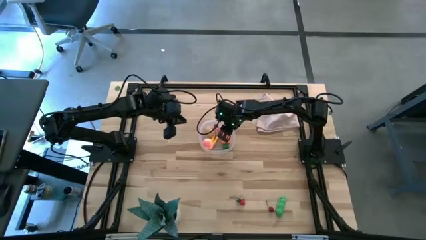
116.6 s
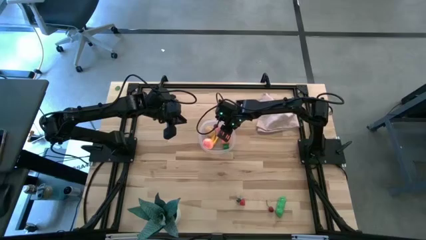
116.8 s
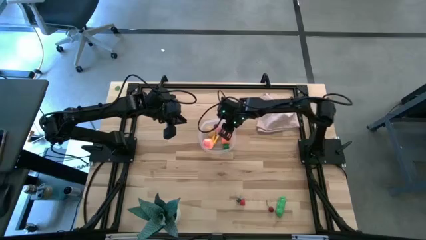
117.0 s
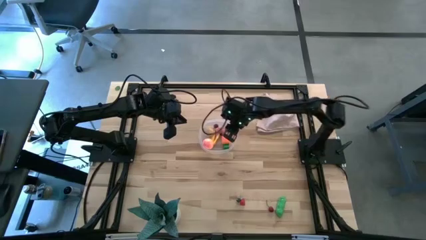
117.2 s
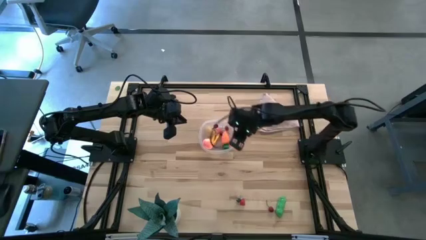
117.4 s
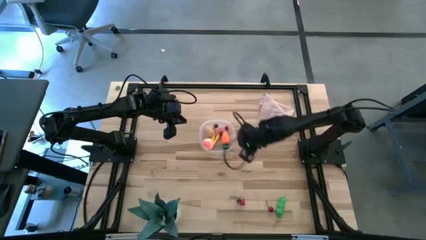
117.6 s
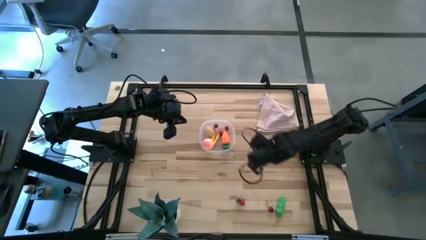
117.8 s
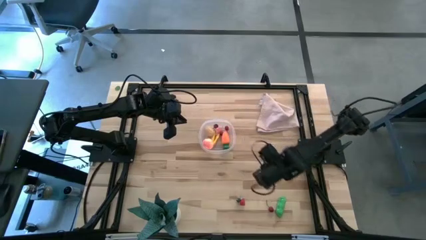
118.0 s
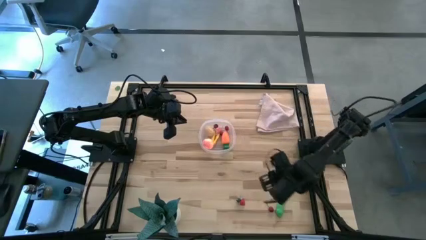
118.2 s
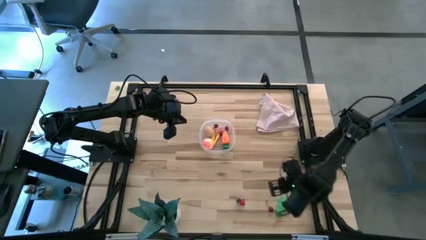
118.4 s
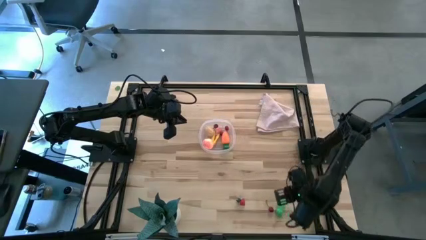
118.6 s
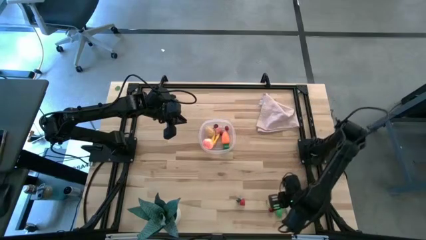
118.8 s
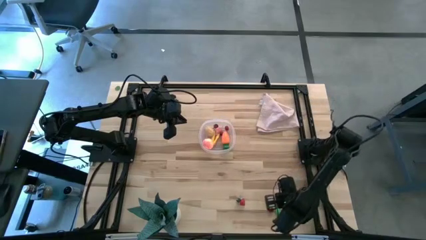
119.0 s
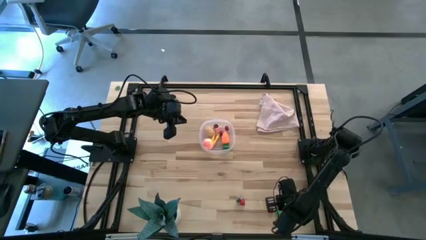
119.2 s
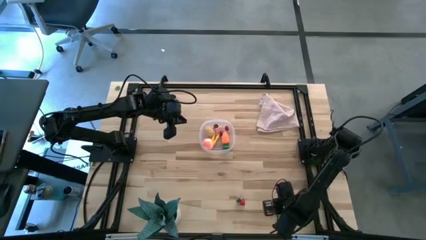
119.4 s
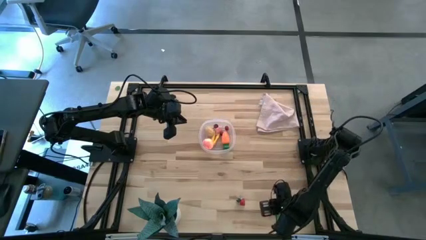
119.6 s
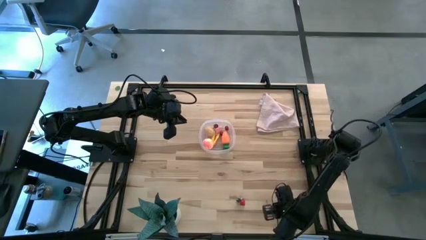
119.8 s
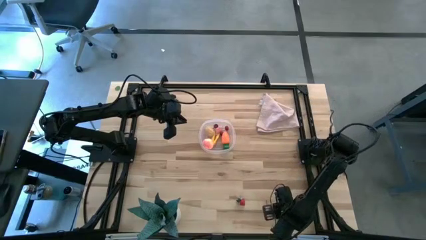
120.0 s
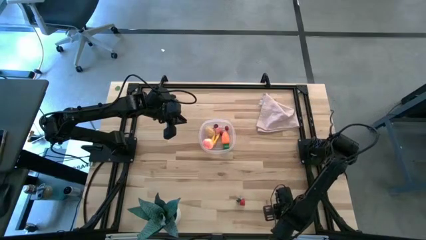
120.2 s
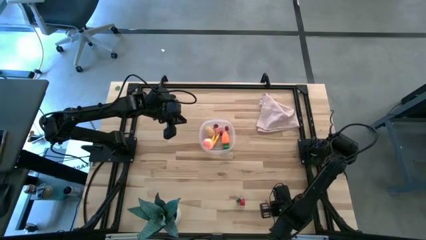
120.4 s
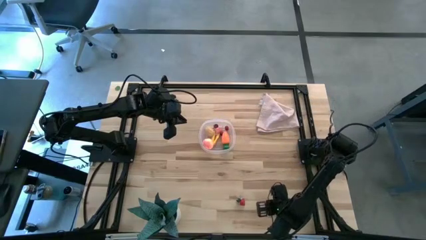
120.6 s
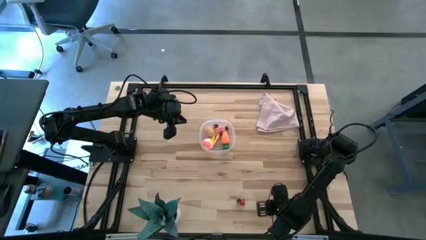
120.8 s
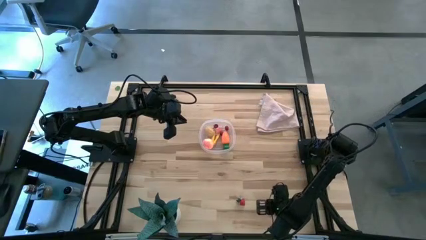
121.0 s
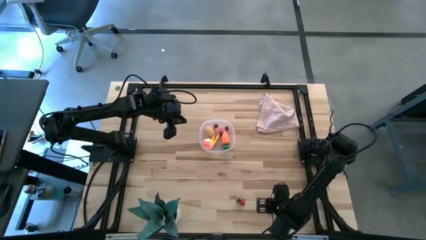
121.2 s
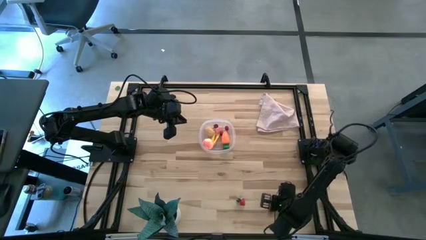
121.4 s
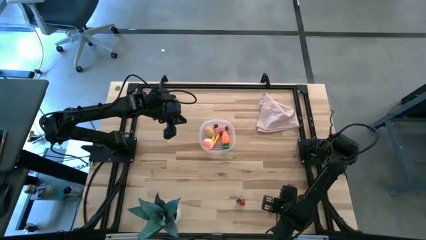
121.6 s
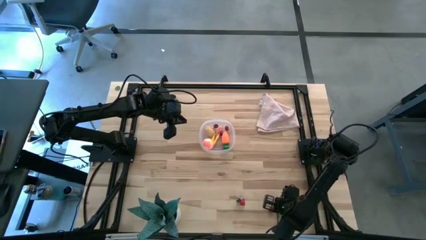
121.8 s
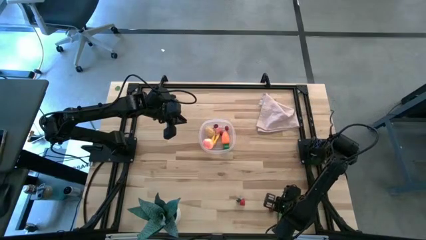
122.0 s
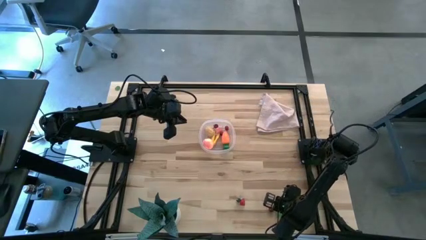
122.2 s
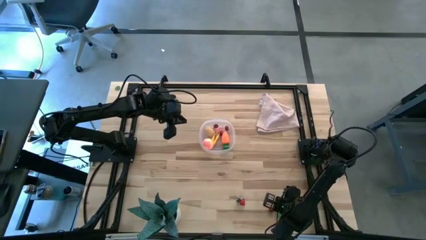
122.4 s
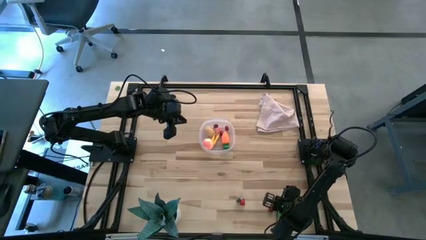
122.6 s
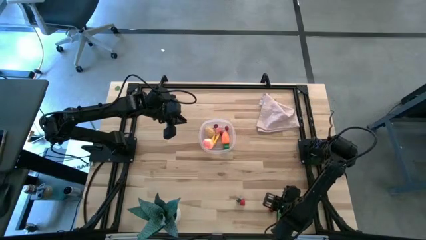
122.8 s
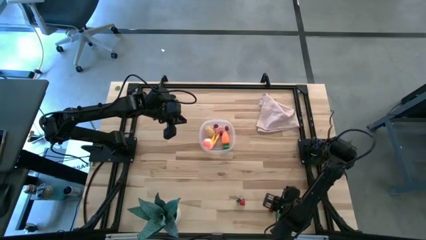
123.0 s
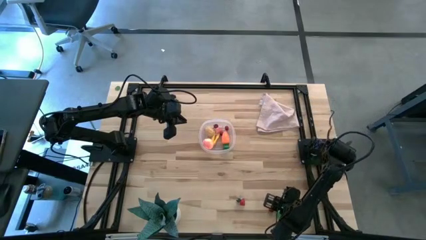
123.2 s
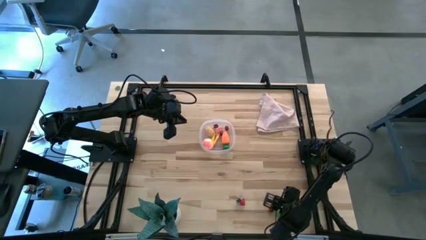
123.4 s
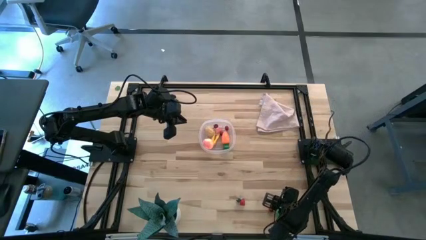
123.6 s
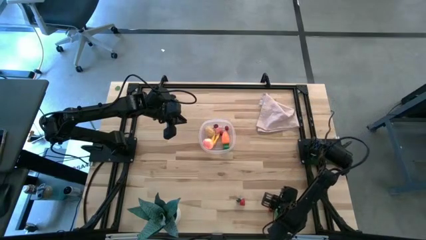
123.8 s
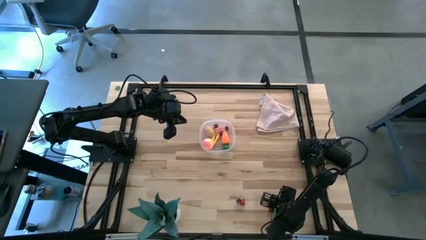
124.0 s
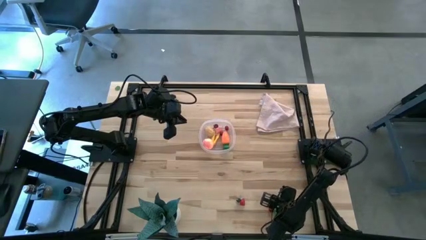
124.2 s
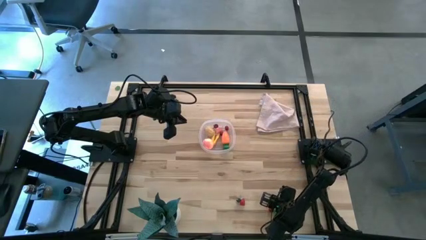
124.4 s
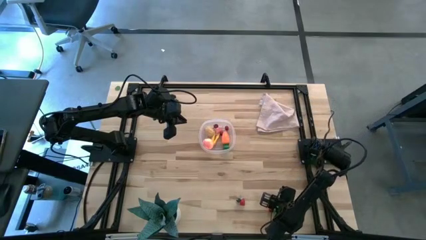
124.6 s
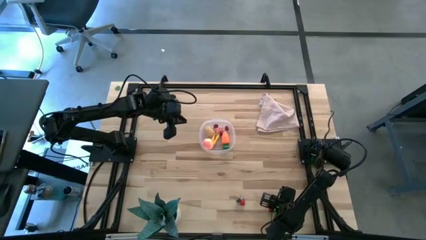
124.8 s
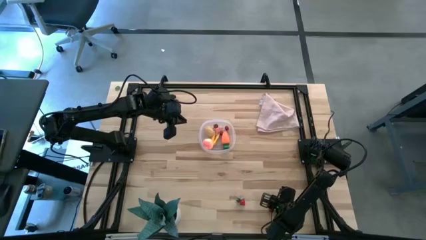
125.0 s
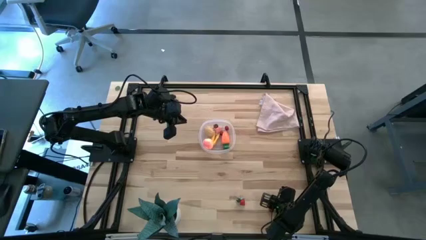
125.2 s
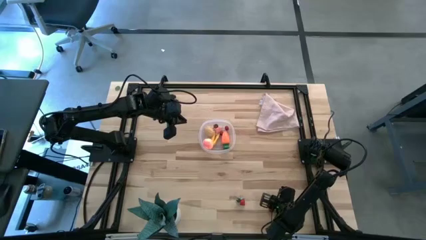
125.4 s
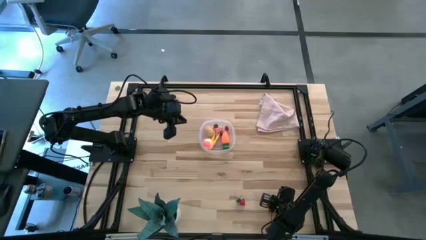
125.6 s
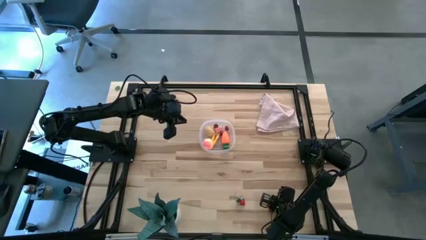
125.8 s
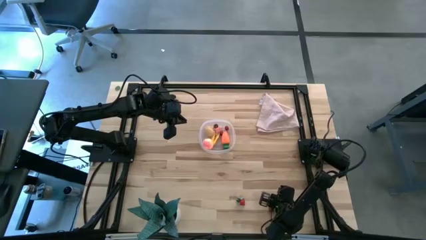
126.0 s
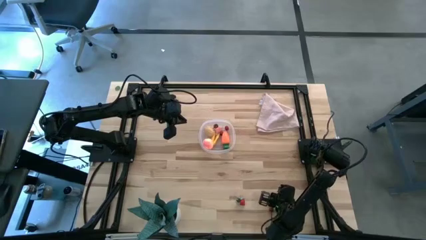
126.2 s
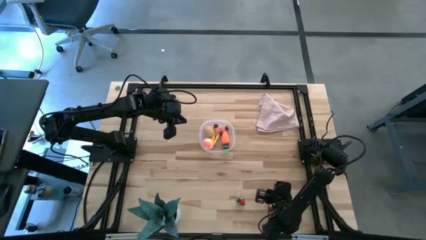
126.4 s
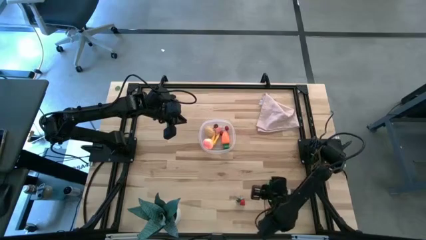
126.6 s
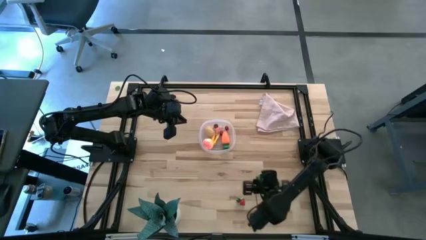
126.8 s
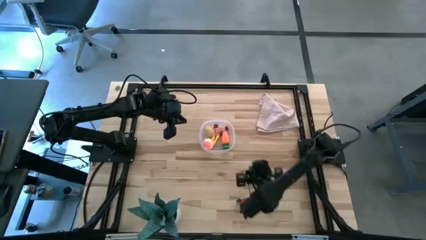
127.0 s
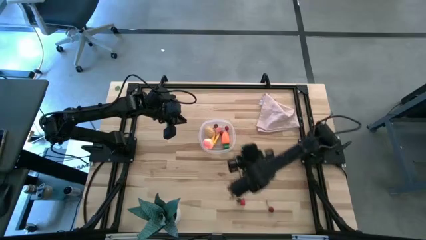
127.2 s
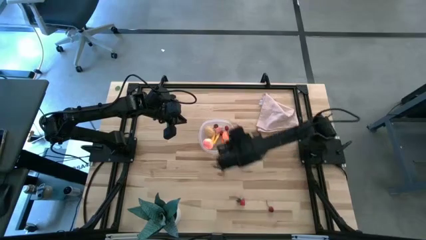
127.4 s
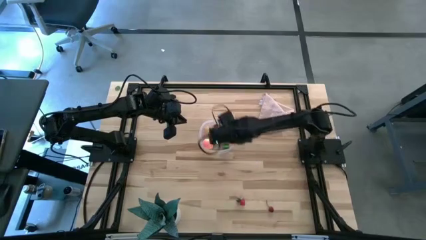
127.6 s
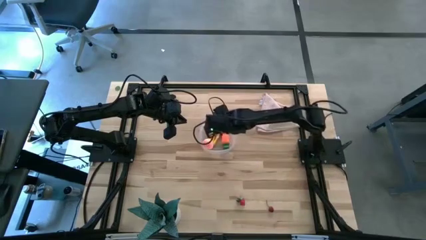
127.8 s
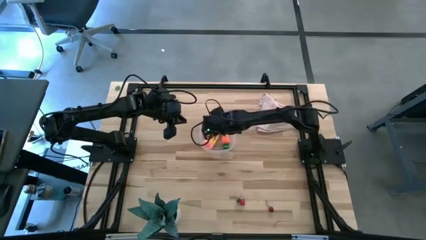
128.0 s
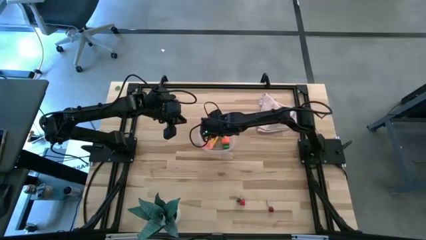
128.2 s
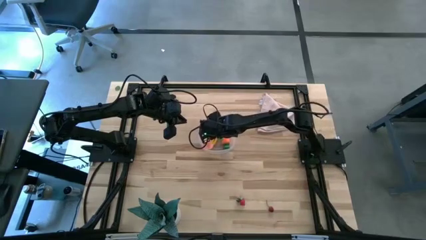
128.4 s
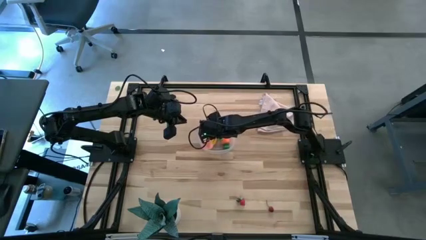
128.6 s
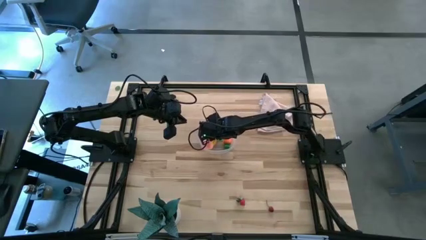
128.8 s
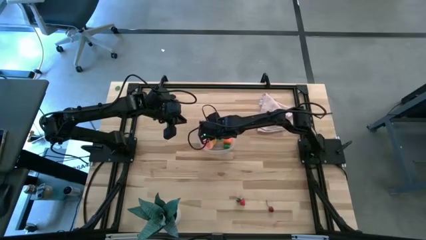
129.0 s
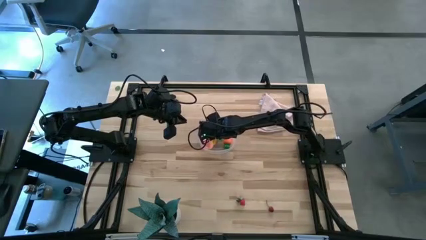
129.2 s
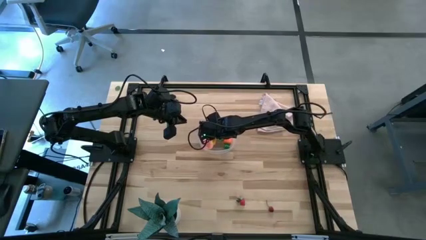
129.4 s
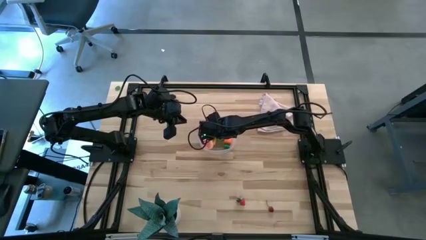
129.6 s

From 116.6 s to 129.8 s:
Task: Pick and placing Produce into tupperware
Put the green pea into the transparent bin

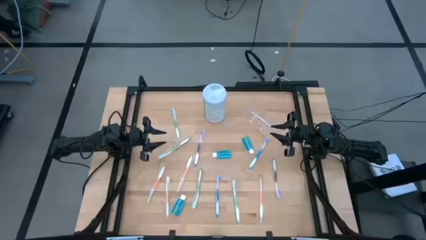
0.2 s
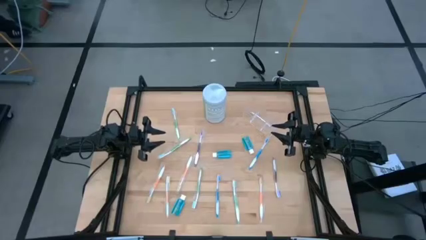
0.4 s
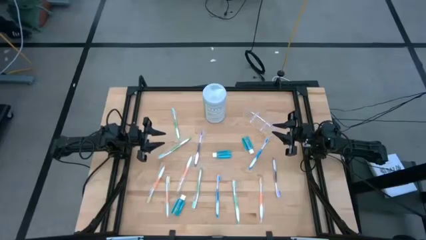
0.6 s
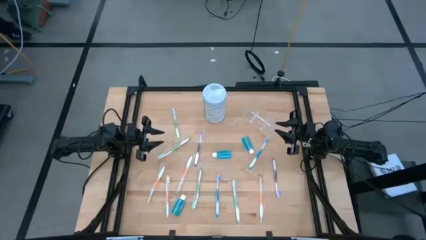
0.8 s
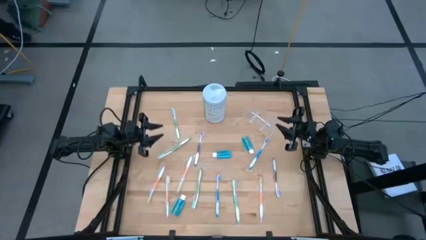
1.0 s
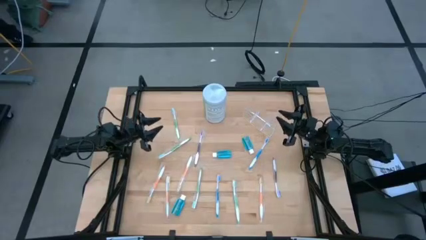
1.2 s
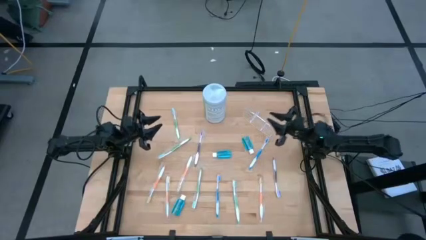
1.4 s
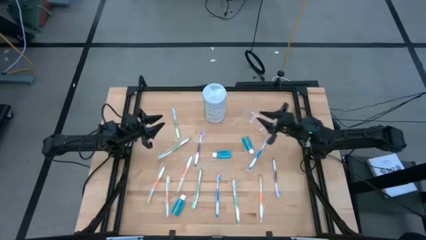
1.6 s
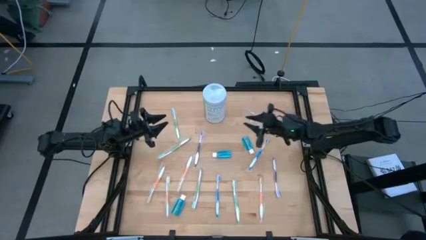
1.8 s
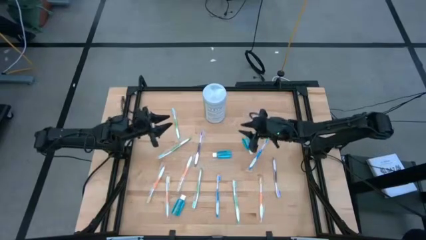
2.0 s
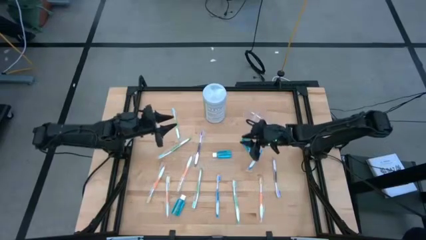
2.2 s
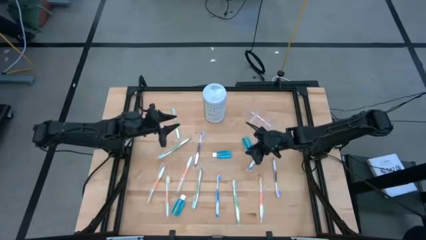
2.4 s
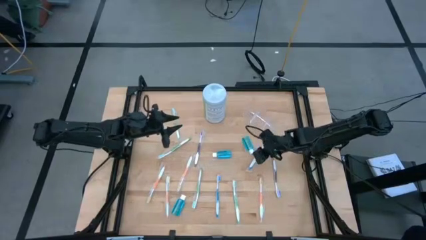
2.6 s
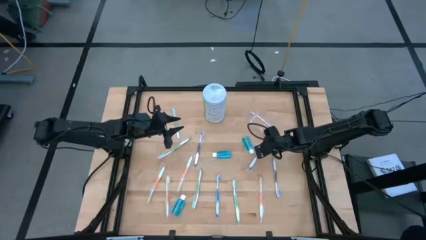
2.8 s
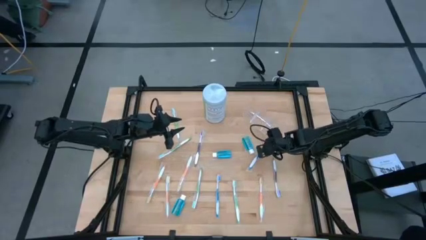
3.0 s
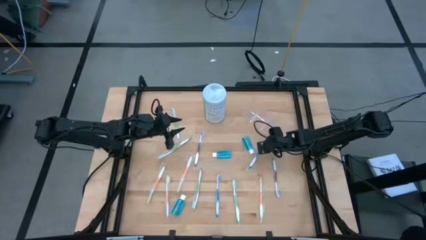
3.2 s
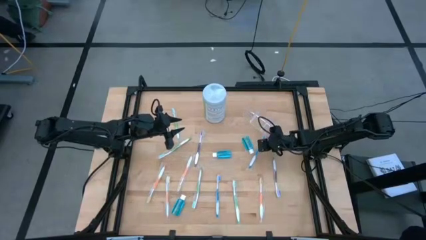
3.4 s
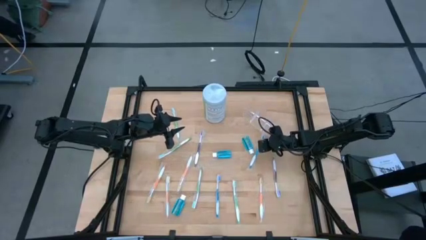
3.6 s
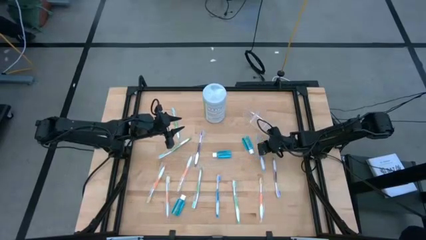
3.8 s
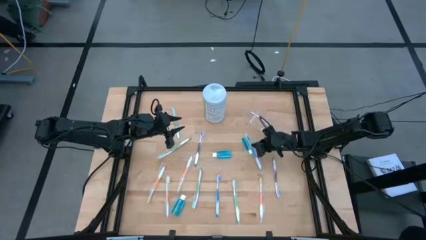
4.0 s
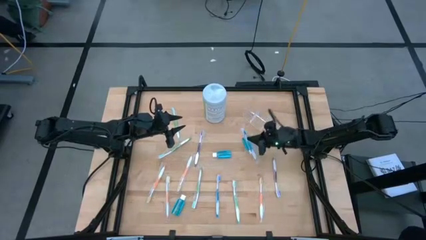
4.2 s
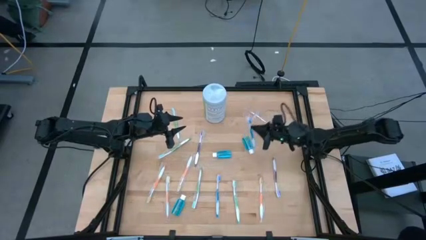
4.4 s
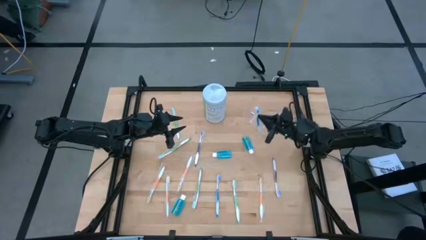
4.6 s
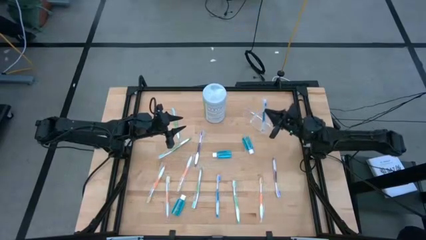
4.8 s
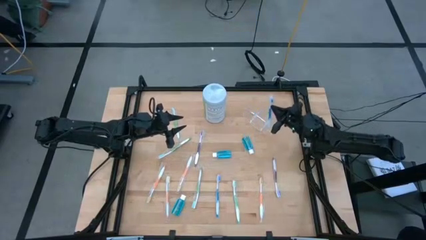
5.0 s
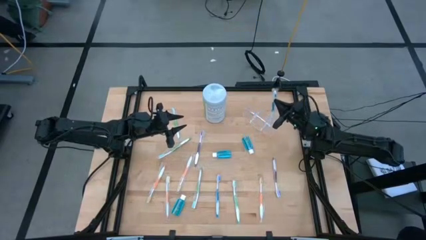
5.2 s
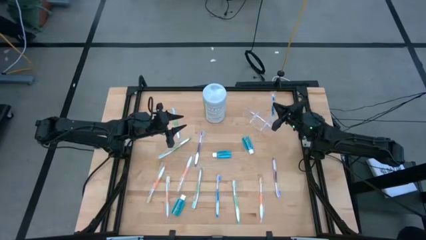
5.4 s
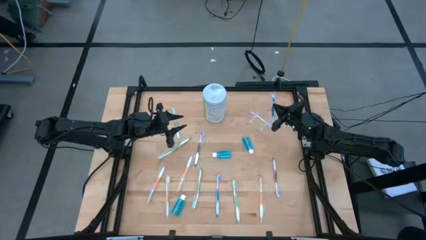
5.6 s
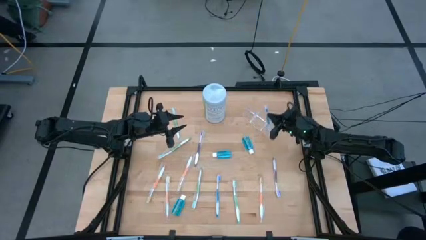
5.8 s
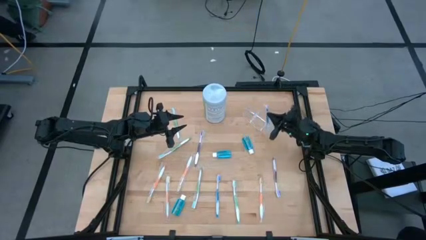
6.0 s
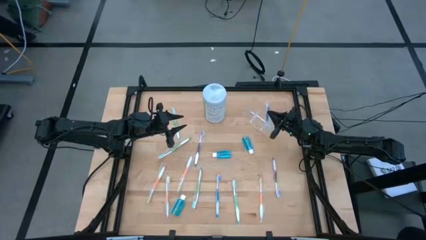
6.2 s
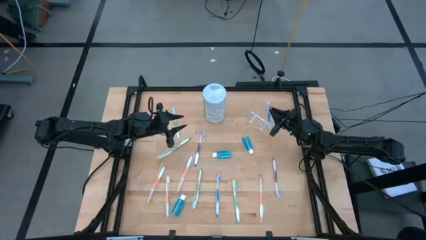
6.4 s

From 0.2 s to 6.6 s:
Task: Pick & Place toothbrushing station
Put the blue toothbrush into the transparent organizer
